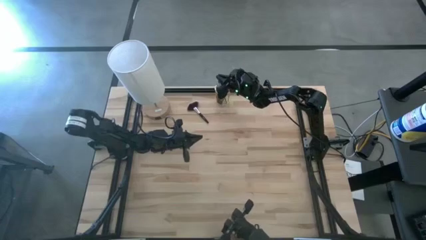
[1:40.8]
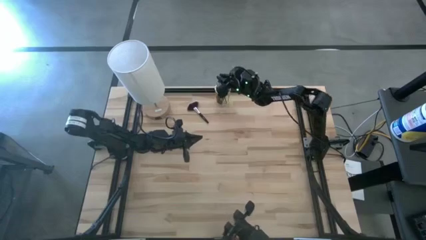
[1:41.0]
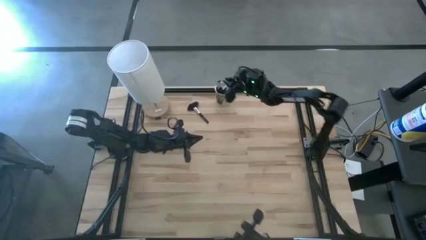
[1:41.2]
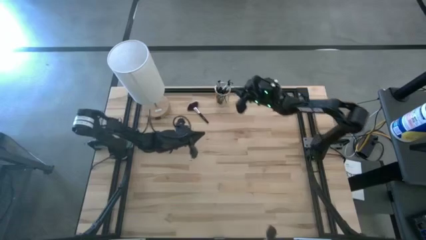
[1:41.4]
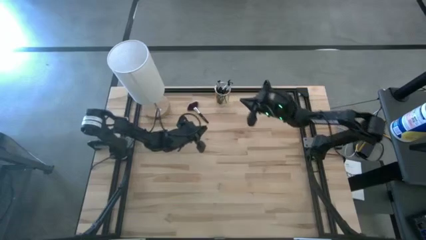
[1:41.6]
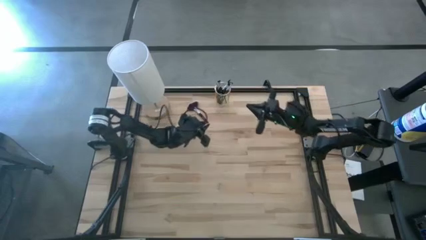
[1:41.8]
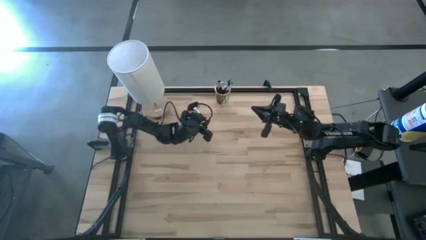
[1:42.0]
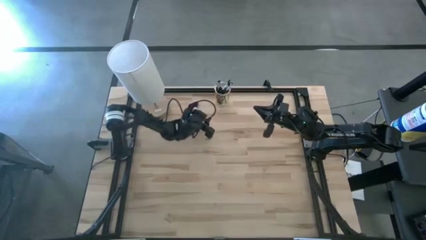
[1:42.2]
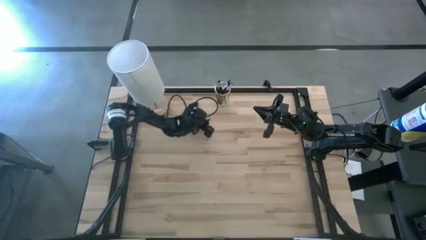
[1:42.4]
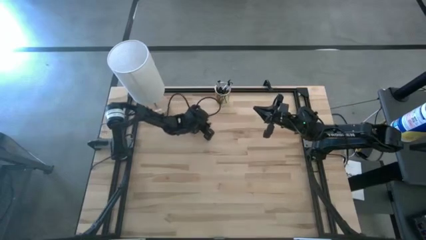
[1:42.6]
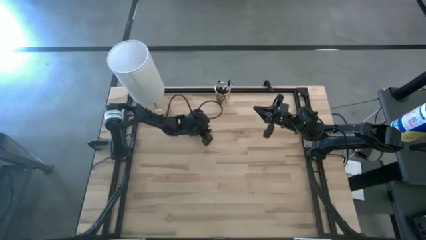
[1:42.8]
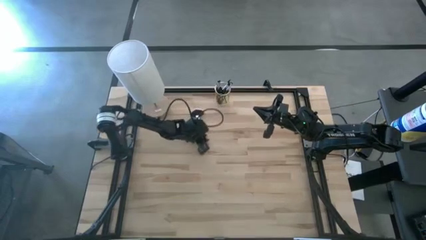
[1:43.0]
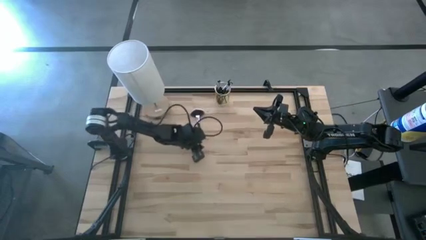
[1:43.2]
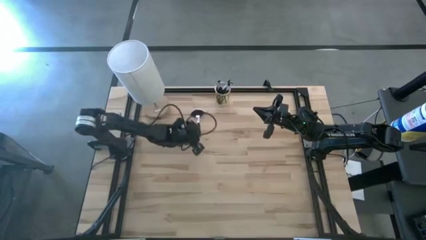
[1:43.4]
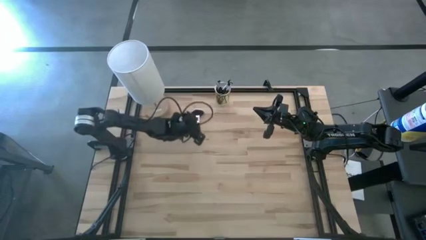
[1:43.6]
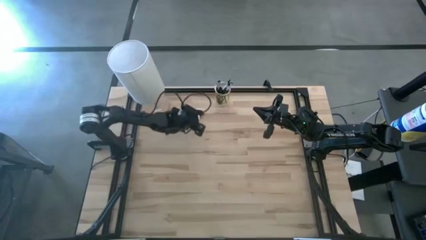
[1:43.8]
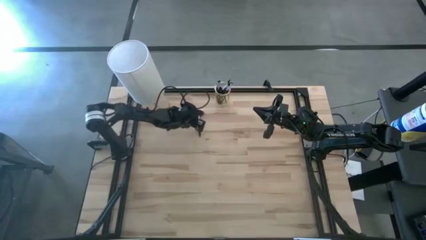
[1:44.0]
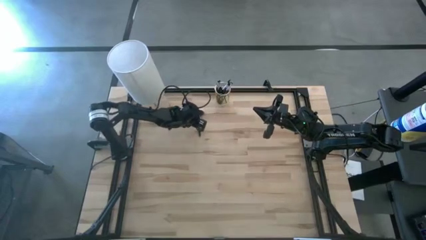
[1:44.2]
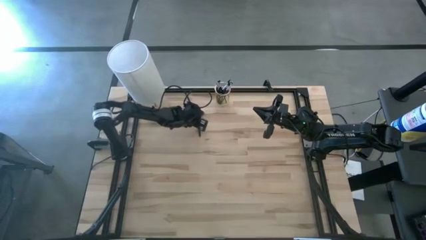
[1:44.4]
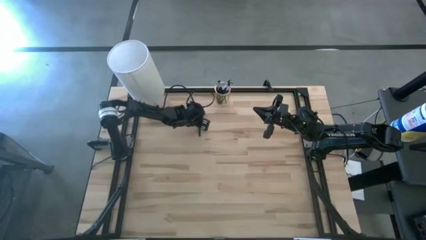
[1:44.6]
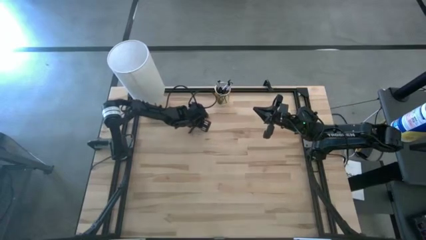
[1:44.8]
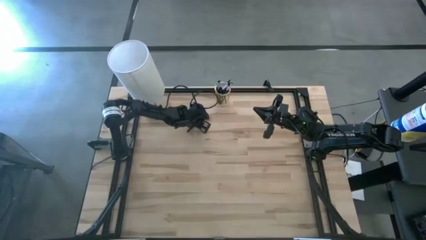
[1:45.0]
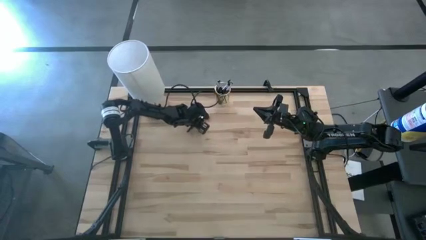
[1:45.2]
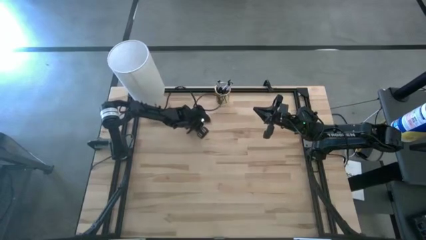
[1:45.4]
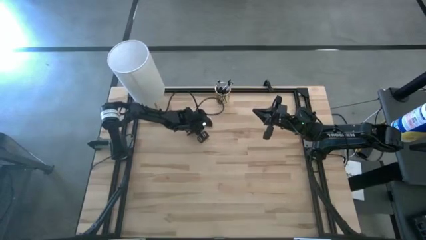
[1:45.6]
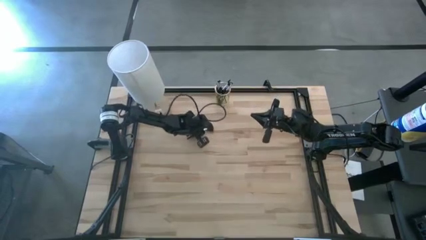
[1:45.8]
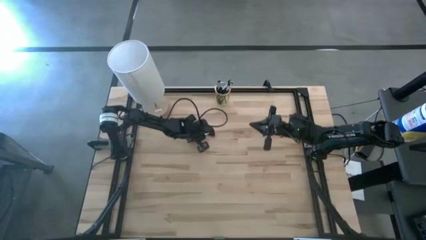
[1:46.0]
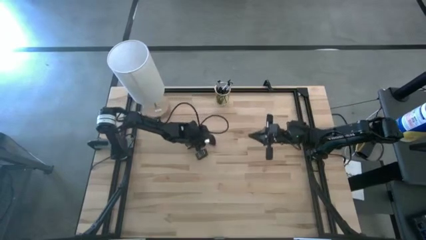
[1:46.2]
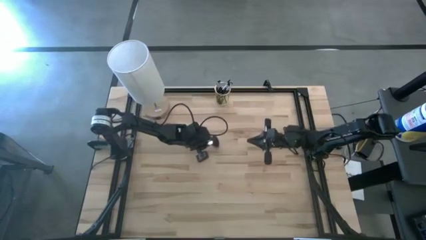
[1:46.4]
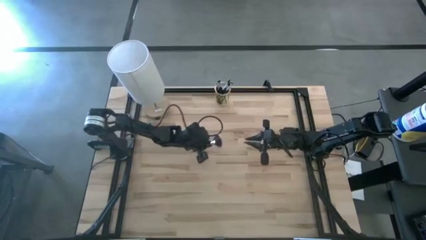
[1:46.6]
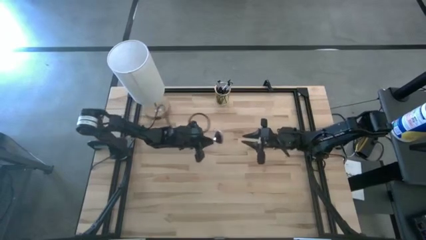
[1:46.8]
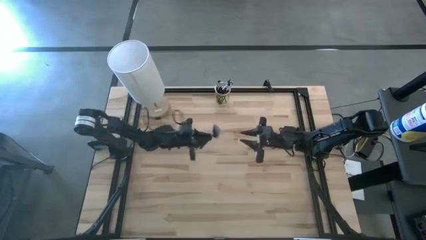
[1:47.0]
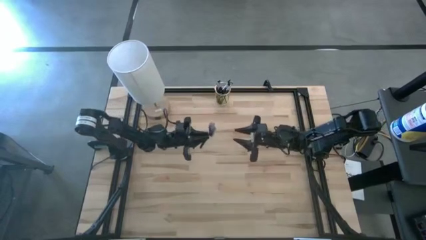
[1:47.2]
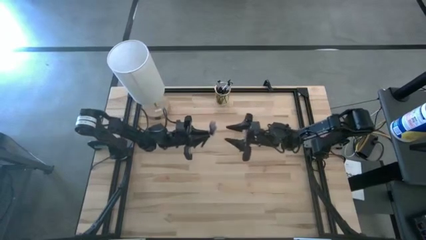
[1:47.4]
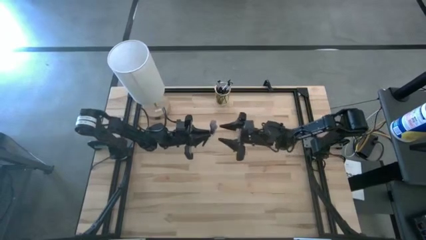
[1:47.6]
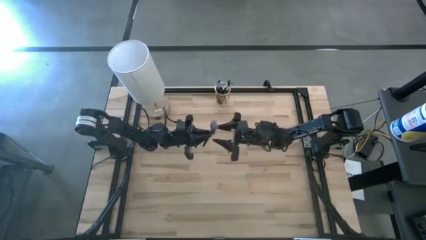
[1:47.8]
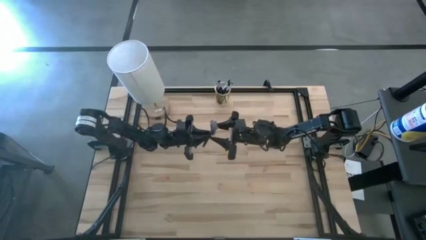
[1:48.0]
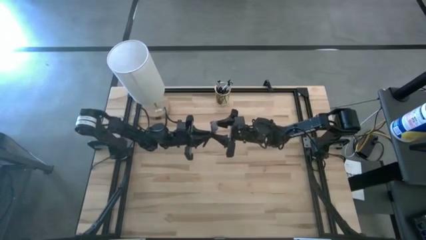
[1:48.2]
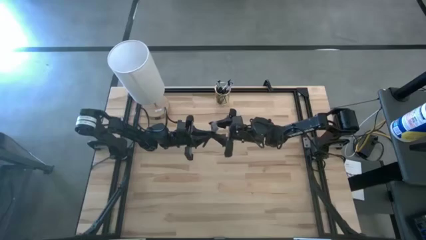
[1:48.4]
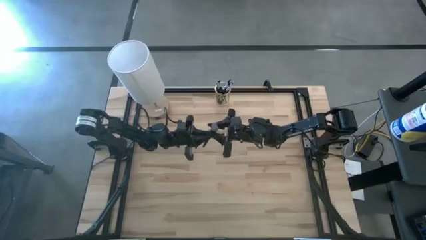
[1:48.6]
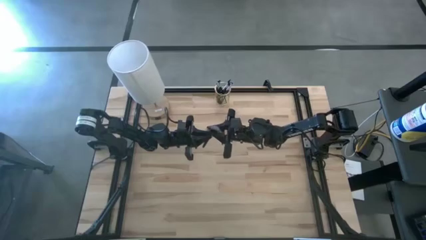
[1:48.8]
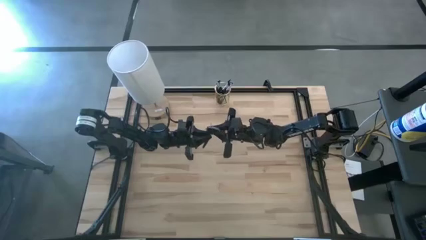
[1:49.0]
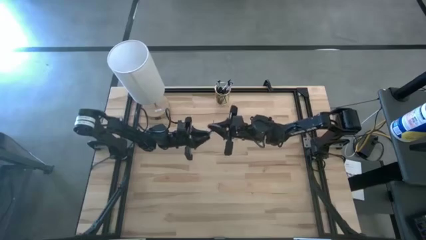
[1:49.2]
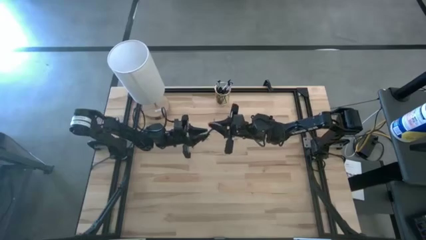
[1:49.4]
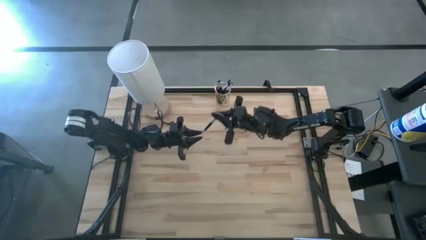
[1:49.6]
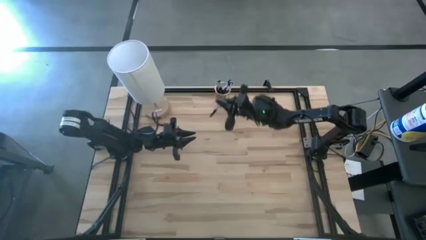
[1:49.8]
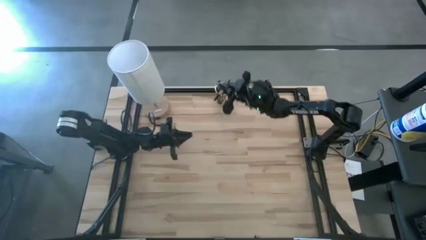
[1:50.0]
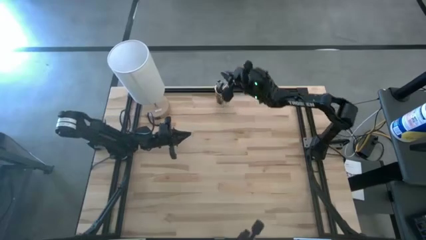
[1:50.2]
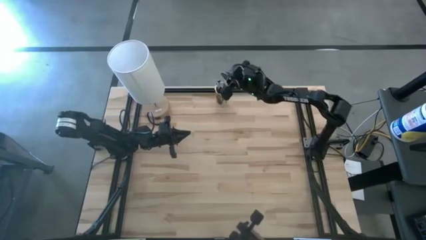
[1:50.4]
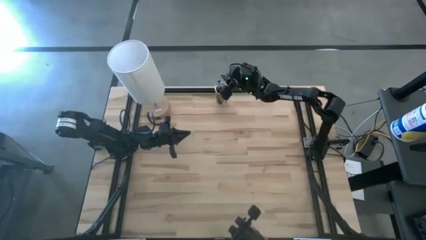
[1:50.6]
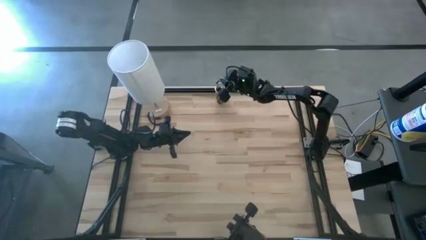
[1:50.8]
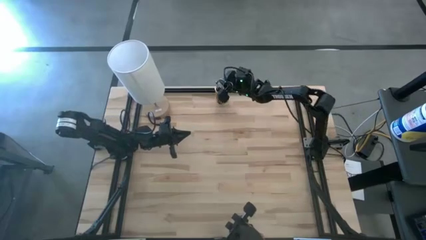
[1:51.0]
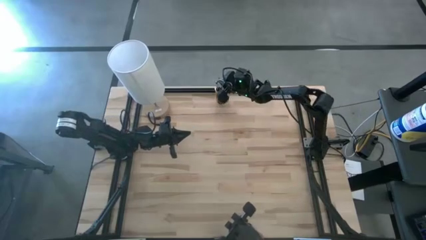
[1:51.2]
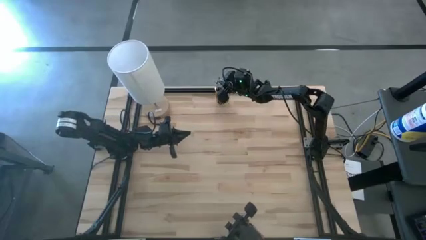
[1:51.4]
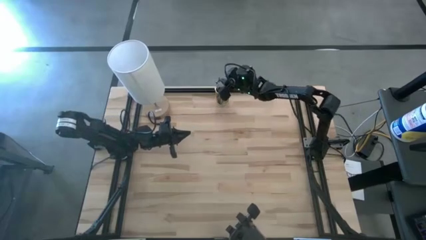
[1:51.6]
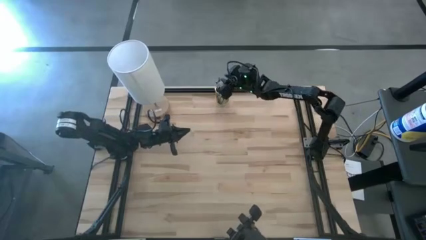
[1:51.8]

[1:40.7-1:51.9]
Task: Put items in baskets/containers
Put the highlighter brush into the gold container

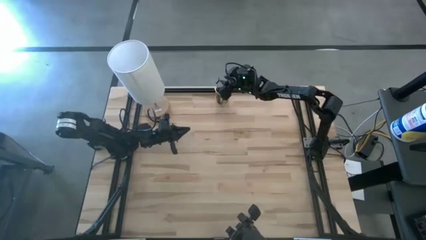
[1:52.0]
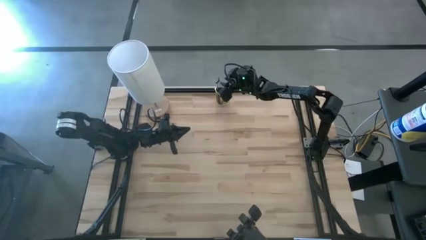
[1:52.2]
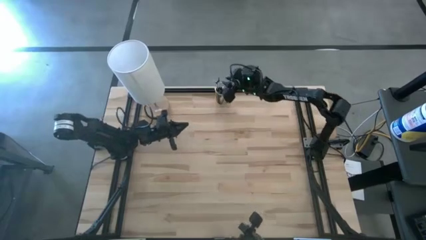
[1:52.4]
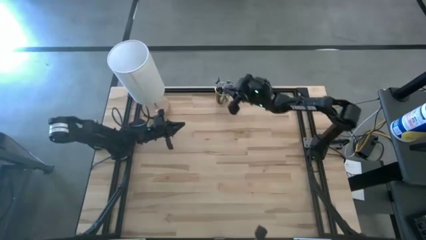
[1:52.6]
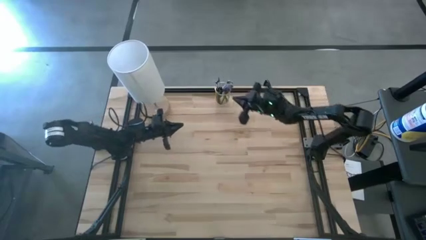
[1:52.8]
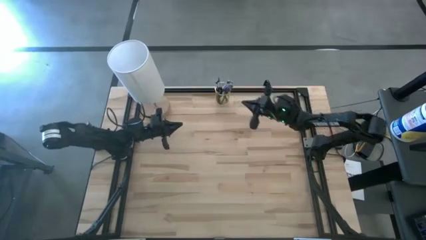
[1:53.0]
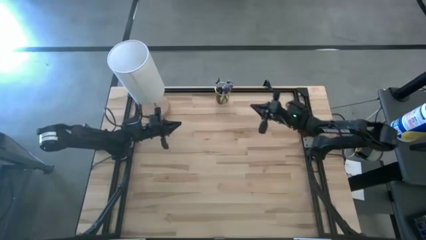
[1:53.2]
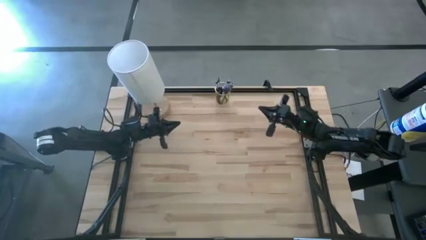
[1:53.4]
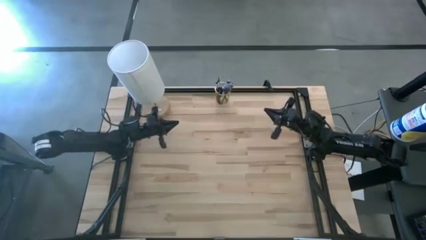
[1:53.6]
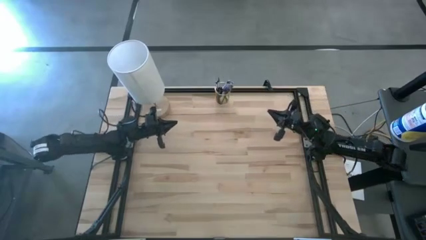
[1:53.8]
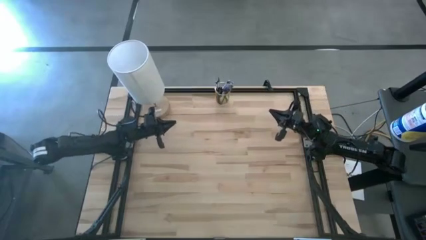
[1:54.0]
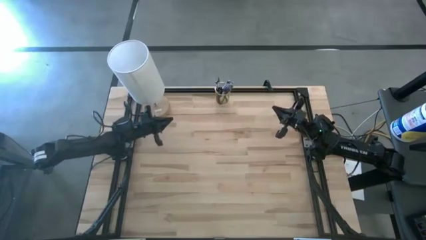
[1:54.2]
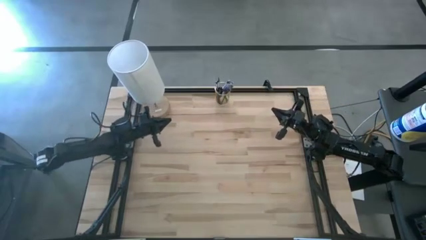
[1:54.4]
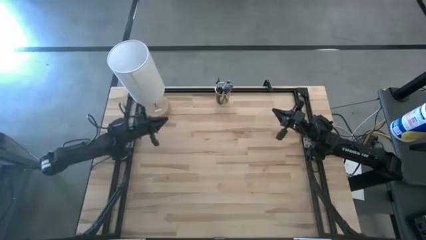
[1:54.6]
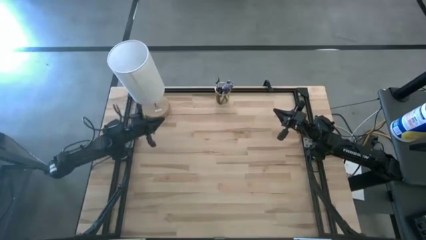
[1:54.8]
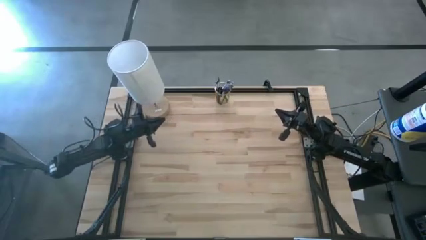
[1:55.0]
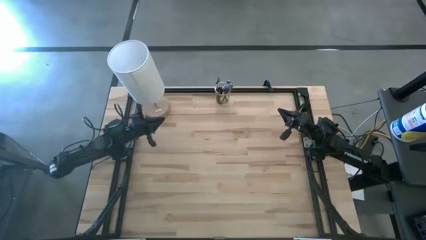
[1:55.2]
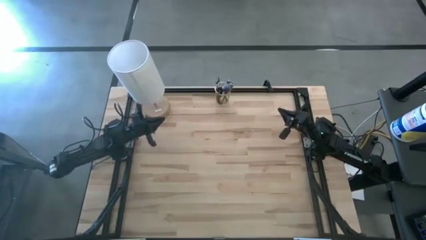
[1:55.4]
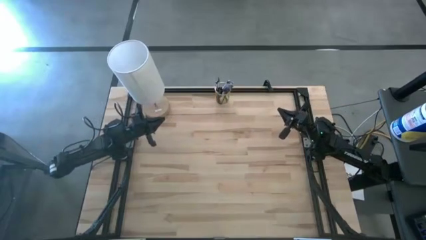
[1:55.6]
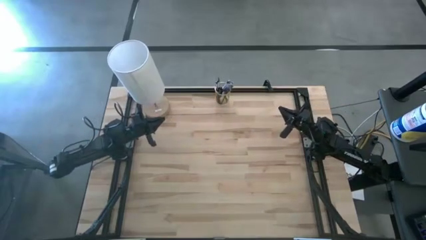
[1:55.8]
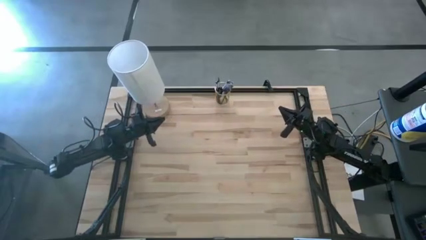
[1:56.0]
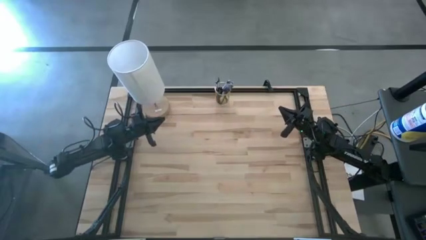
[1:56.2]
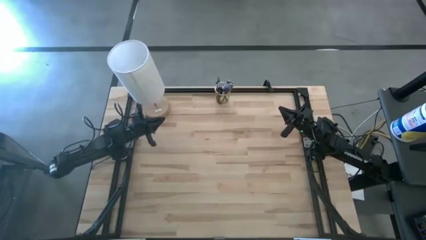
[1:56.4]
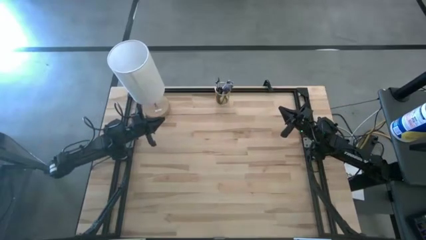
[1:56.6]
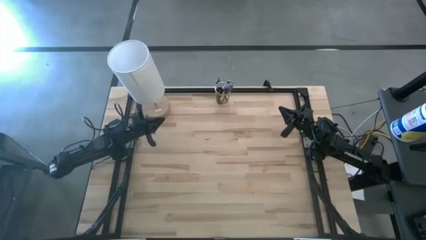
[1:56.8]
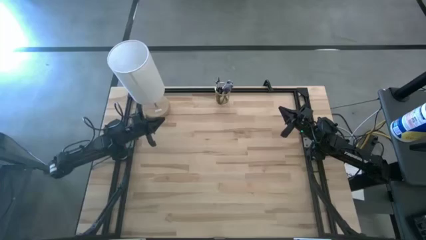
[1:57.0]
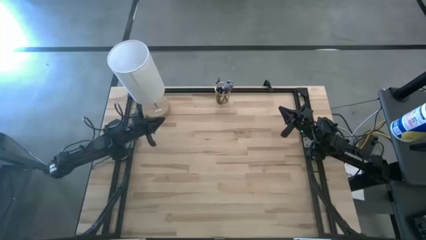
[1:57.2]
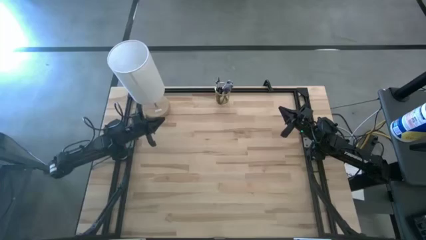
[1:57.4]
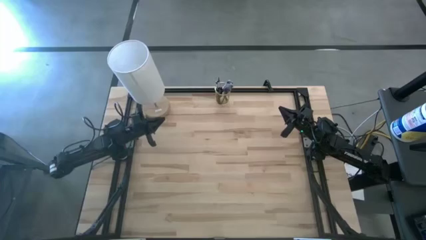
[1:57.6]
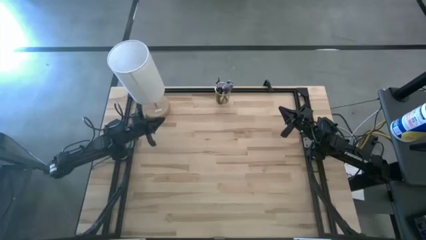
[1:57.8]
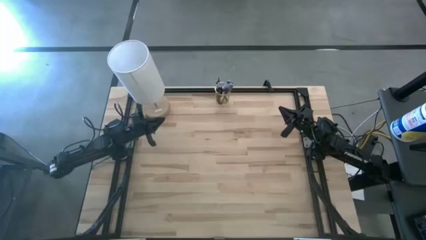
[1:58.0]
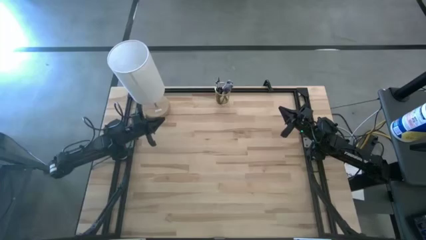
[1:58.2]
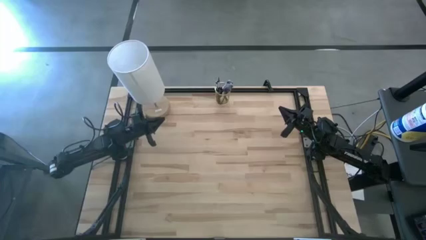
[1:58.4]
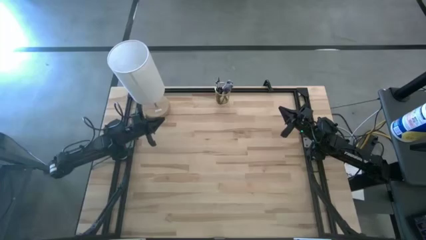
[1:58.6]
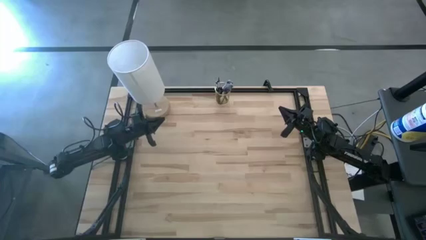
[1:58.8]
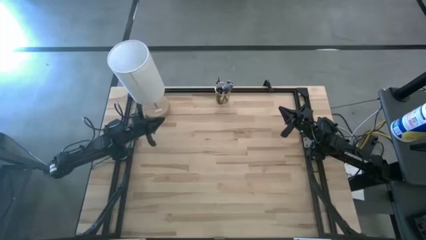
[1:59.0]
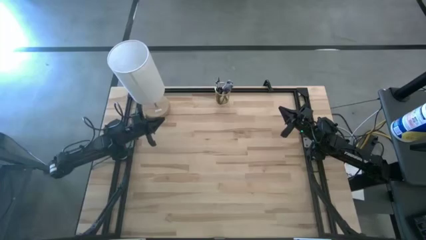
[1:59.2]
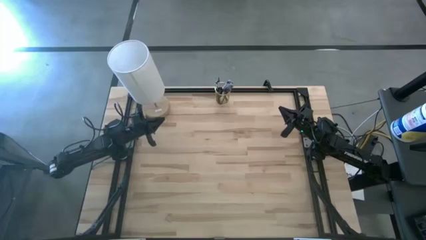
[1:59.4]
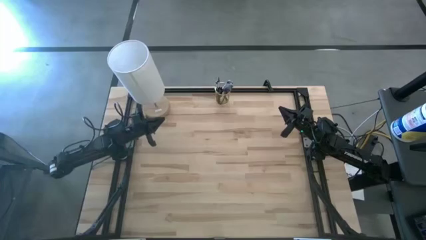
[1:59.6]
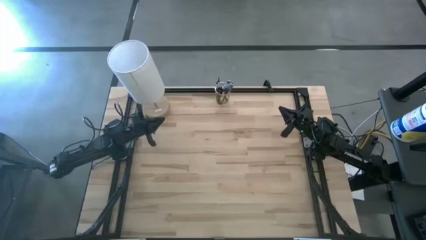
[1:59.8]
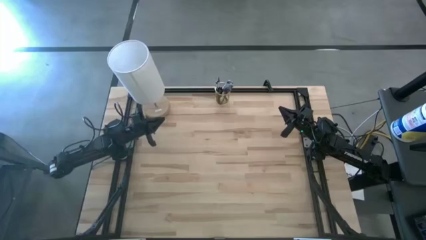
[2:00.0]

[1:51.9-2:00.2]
Return to Home Position
